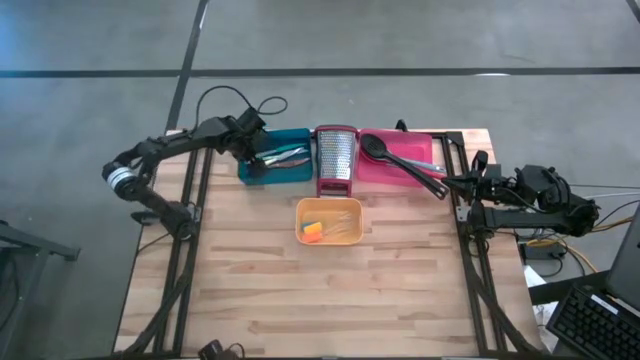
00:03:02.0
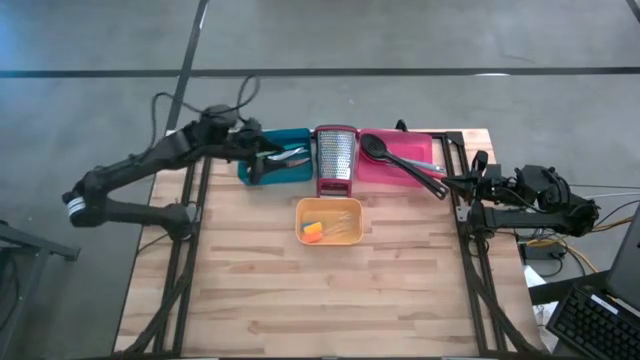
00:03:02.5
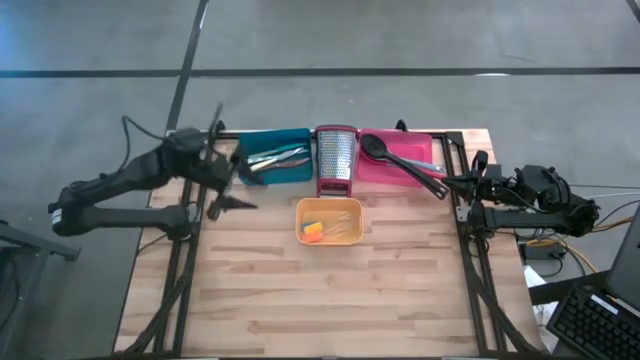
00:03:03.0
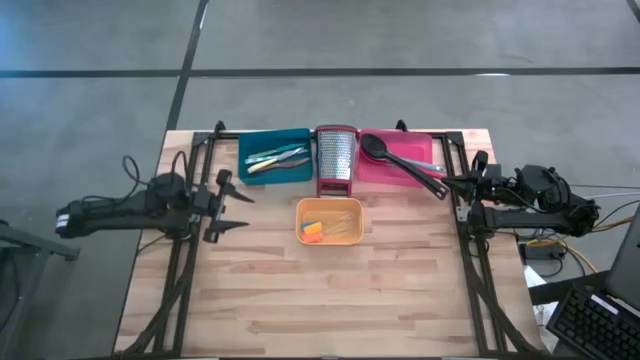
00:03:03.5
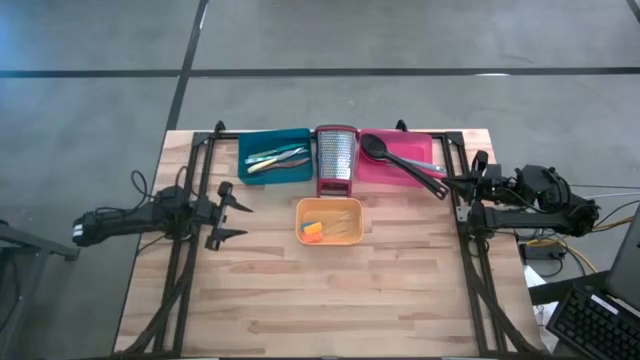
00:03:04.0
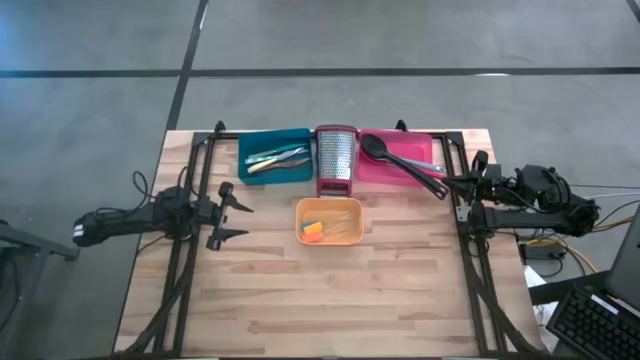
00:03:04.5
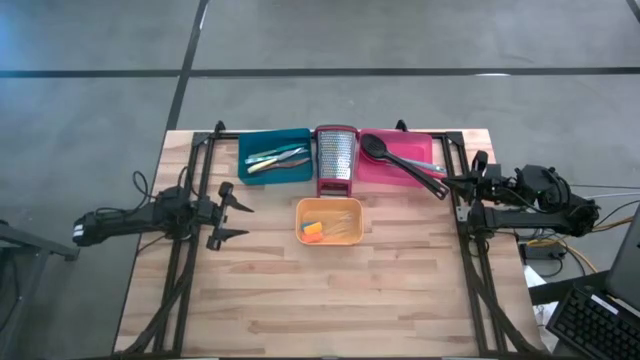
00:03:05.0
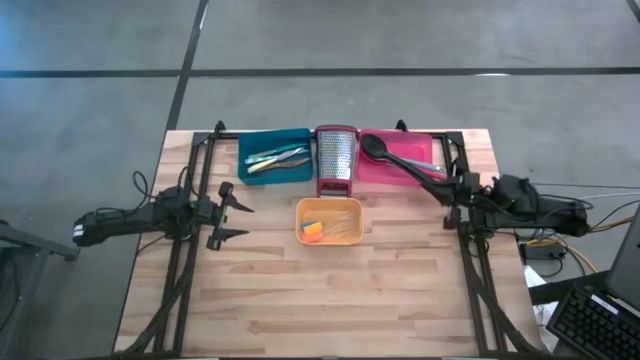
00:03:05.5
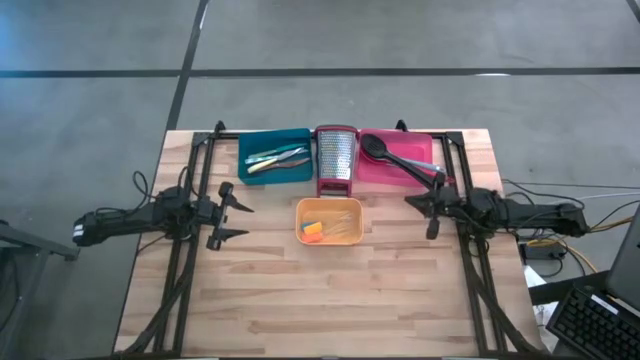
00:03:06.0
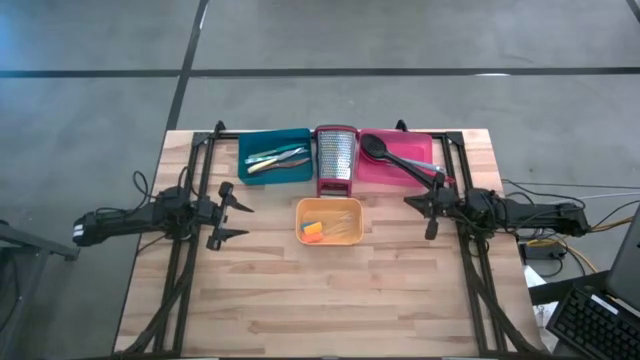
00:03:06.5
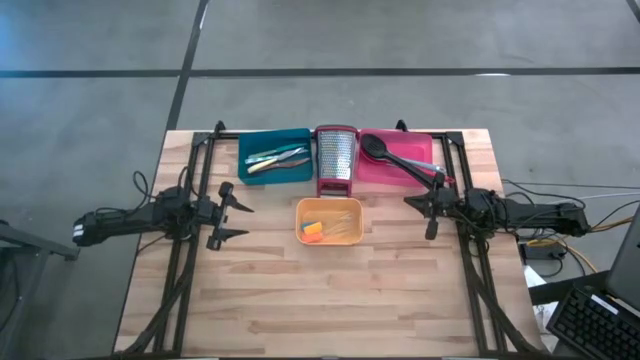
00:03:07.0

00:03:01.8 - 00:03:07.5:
Task: Pick & Place Kitchen Items
Return to Home Position

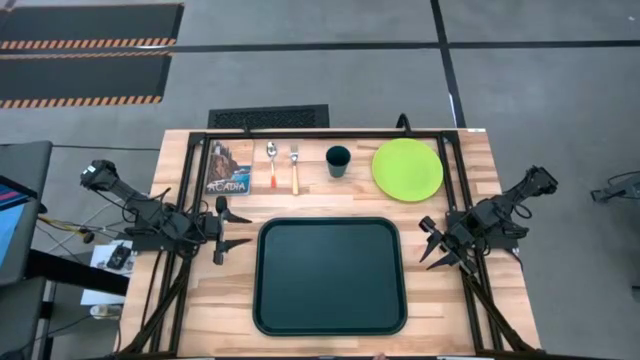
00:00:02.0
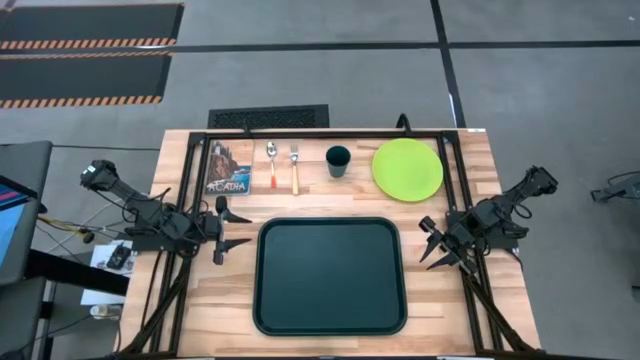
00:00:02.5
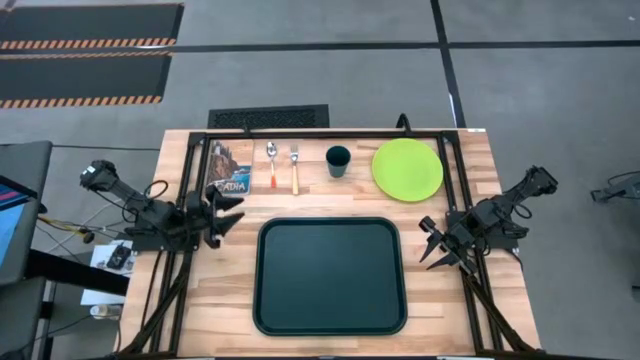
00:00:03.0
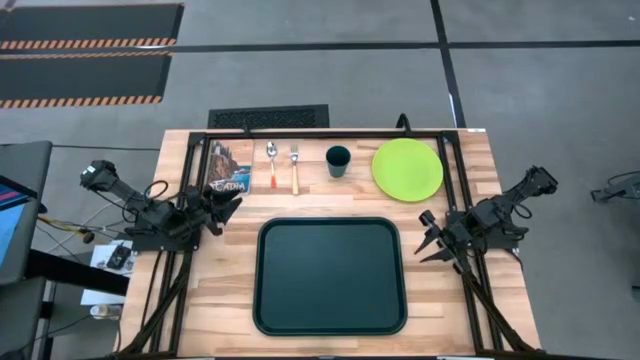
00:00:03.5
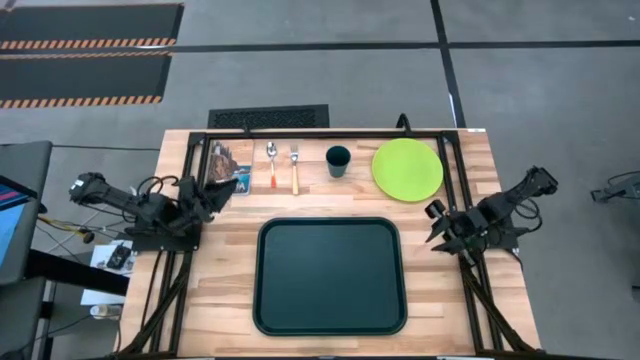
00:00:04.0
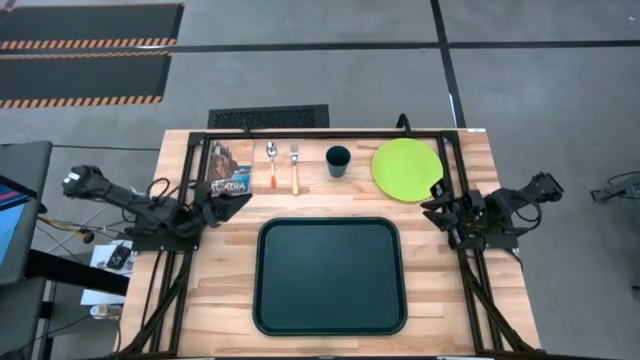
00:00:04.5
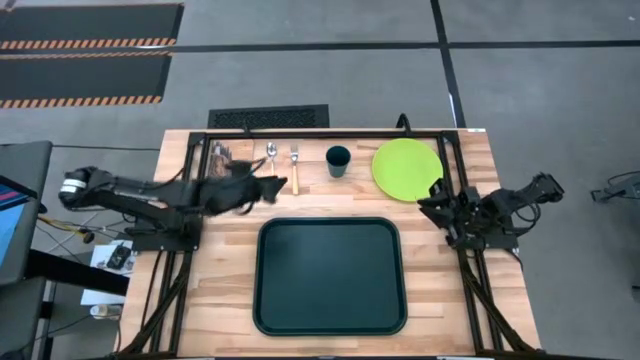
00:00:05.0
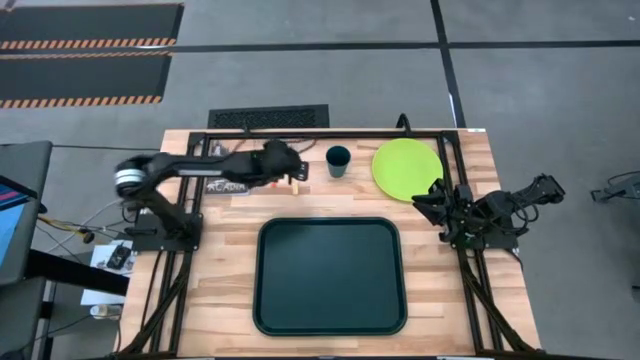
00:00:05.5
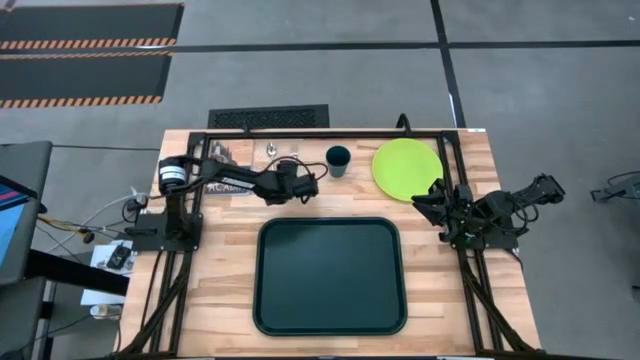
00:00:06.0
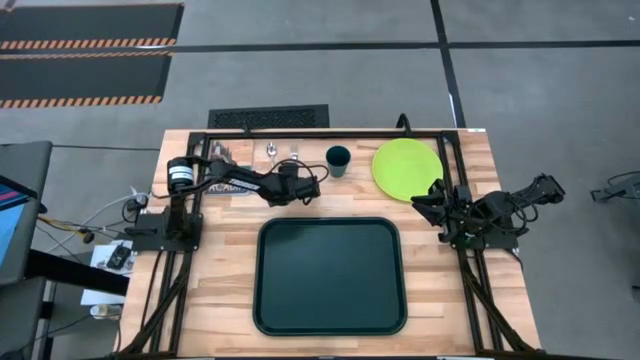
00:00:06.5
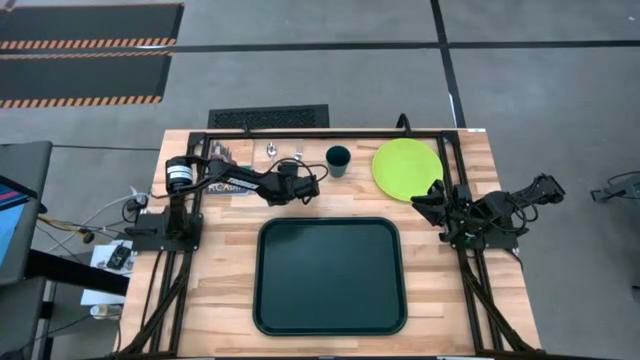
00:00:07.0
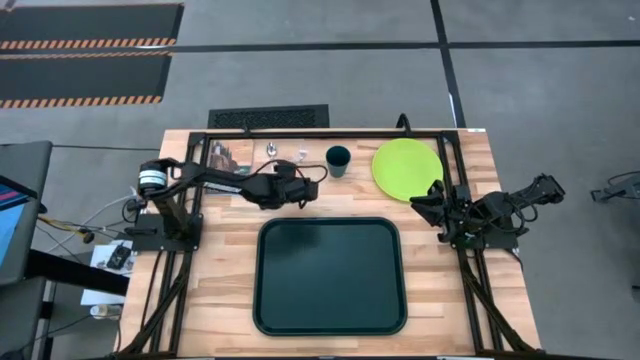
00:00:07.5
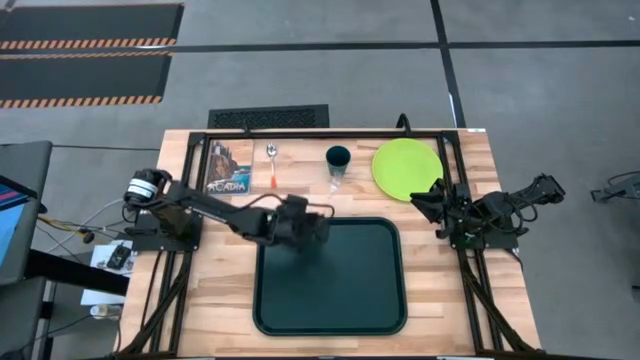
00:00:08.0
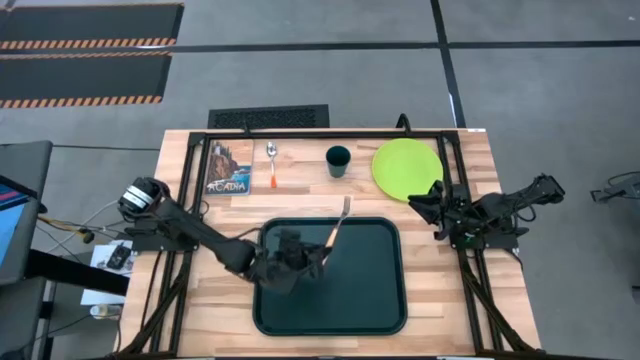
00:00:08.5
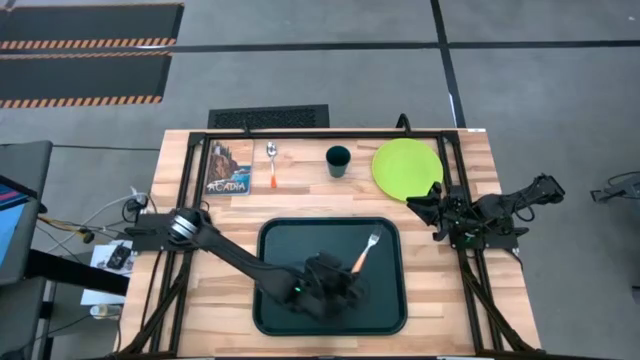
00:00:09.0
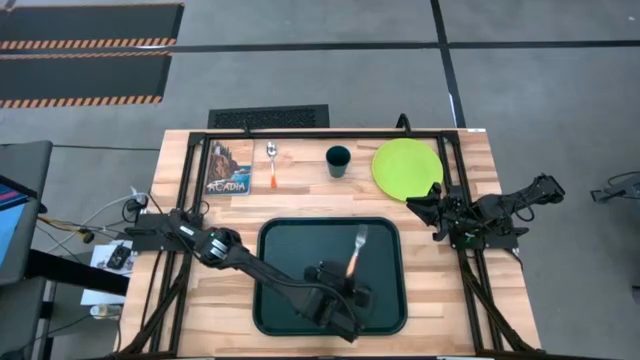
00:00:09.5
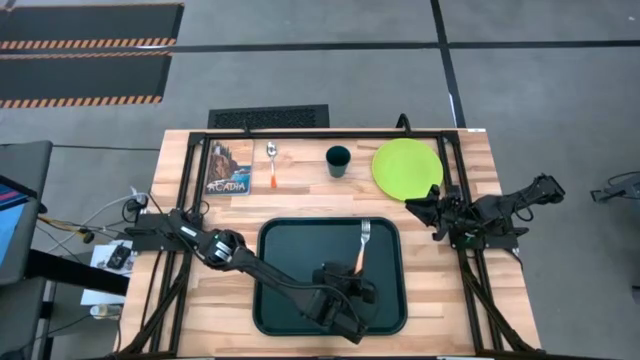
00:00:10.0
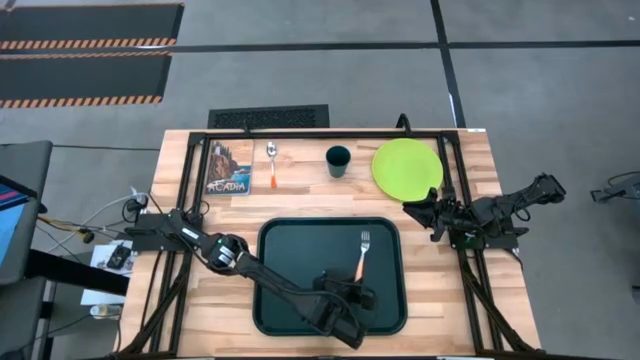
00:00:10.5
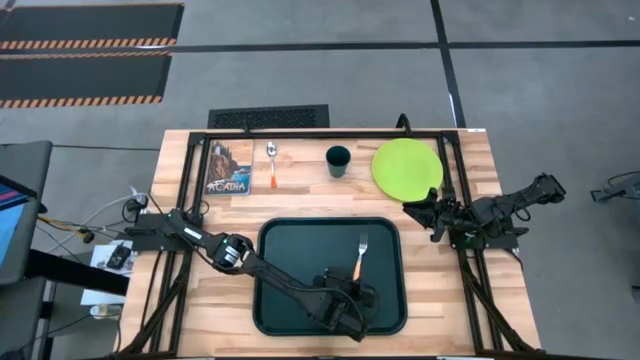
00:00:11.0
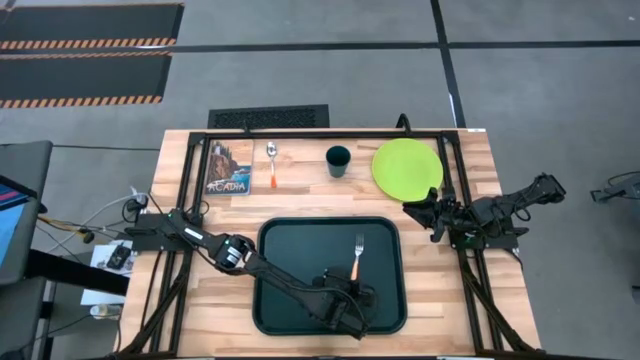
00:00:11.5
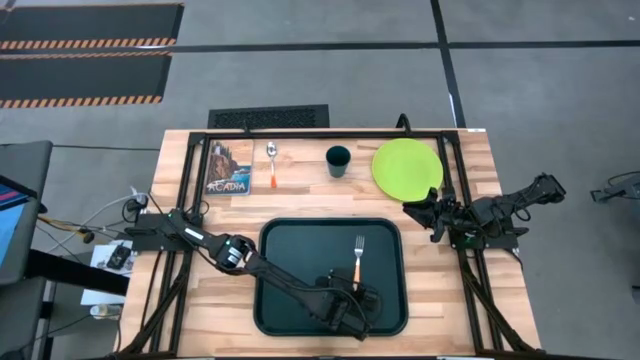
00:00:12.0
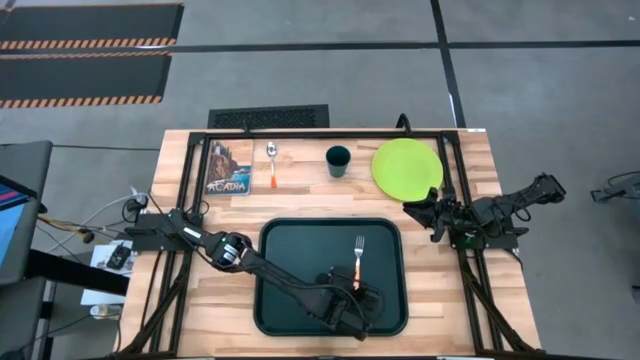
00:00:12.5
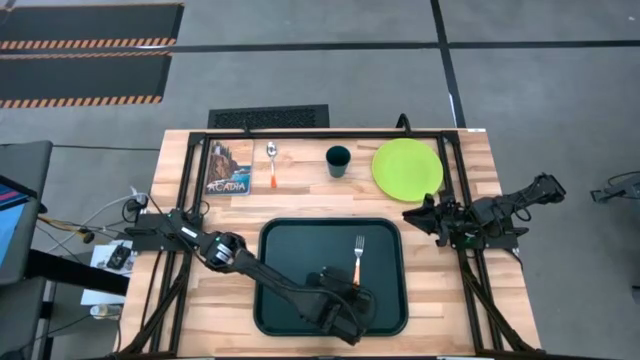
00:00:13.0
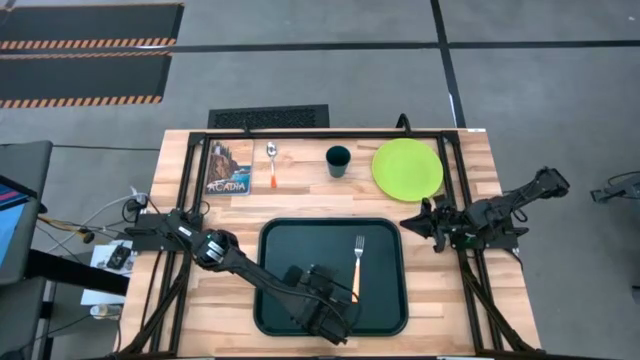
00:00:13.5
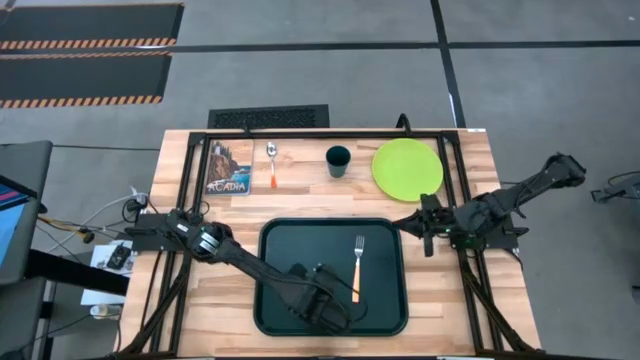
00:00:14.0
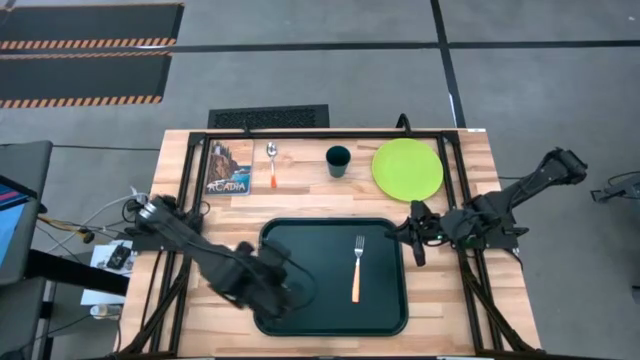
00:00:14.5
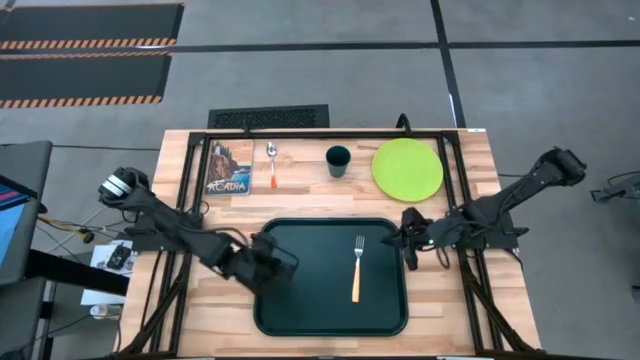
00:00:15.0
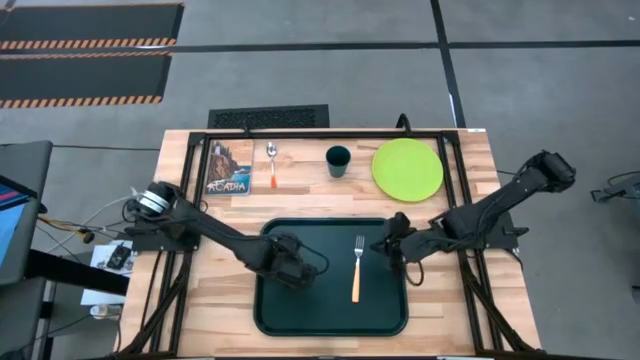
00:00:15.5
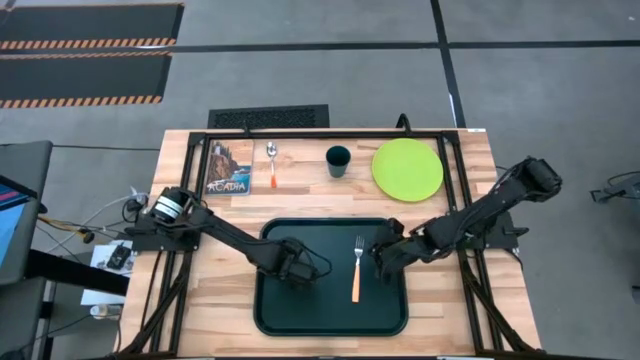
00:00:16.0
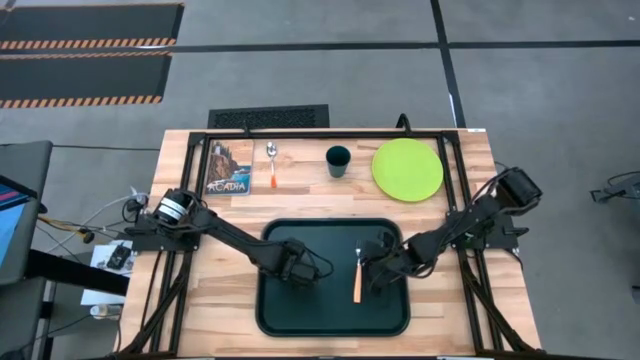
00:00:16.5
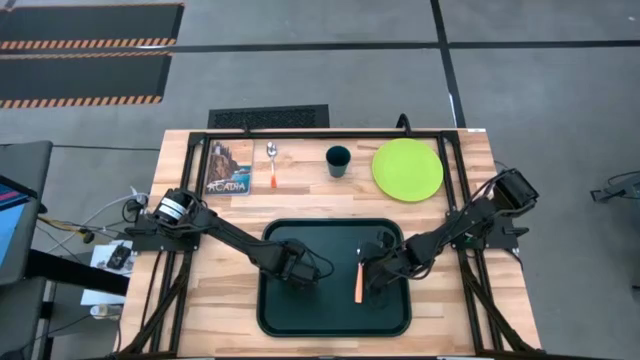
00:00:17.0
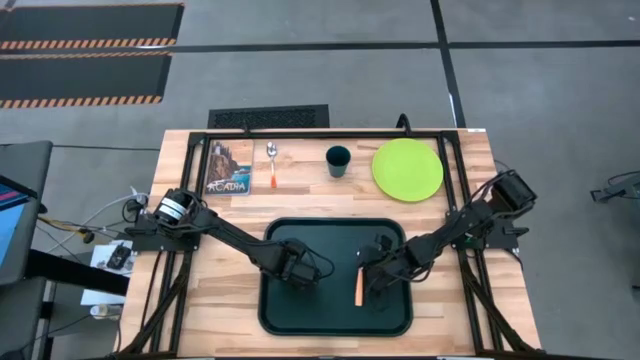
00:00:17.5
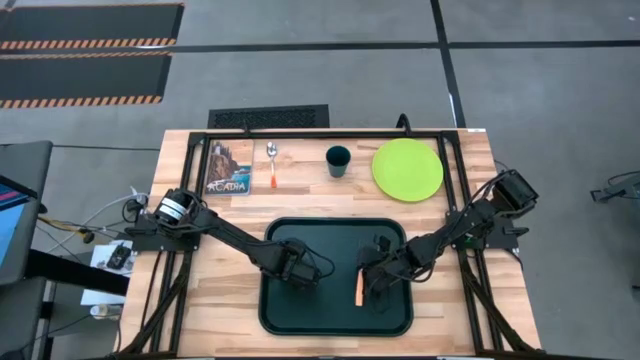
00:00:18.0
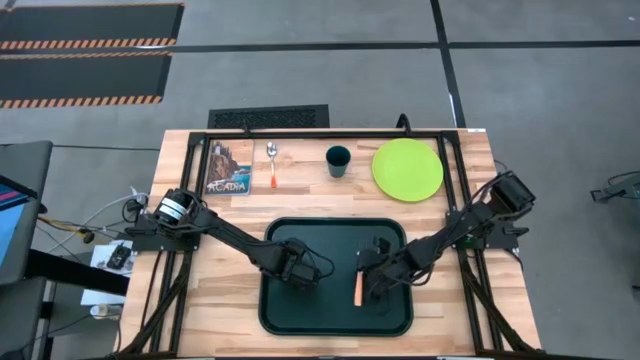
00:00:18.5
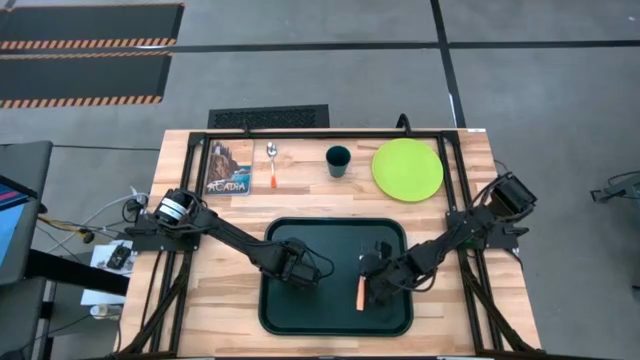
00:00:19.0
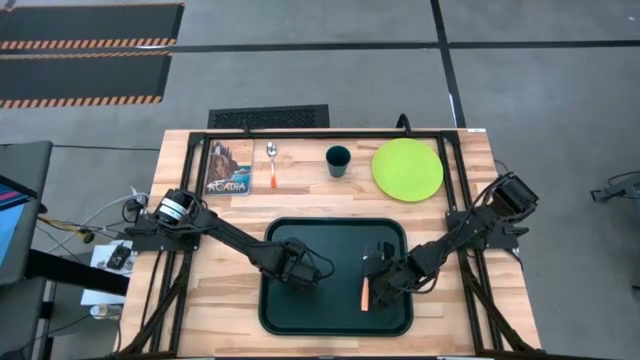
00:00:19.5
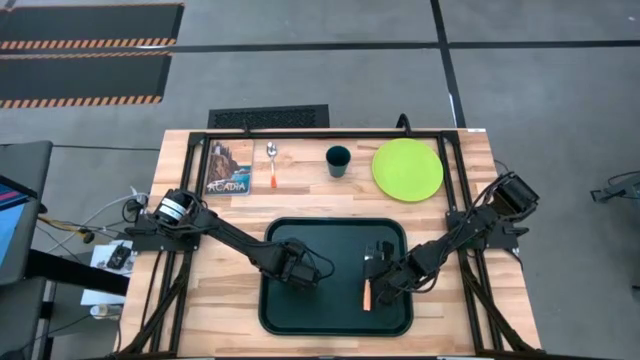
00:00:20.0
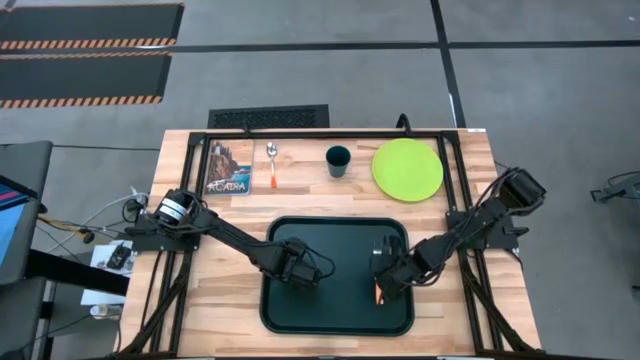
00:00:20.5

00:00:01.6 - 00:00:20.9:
Task: Pick and place plate/cup/fork/spoon on tray
Put the orange fork on the right of the black serving tray
